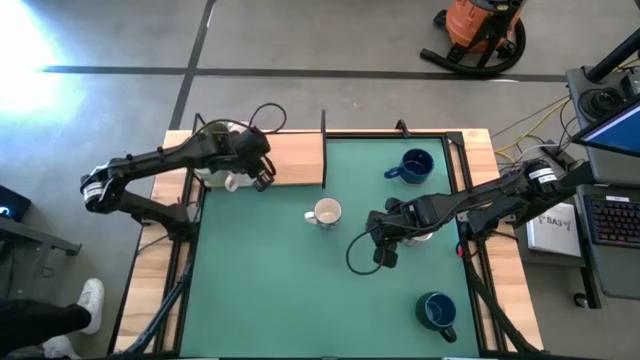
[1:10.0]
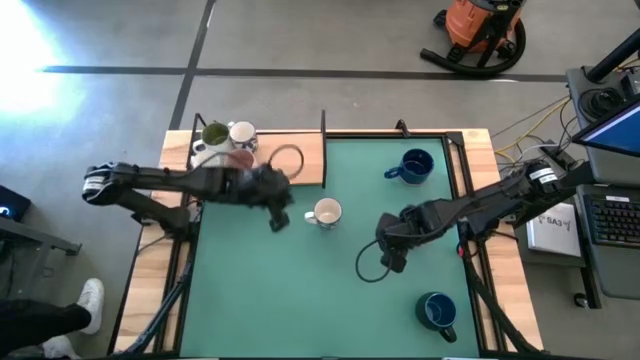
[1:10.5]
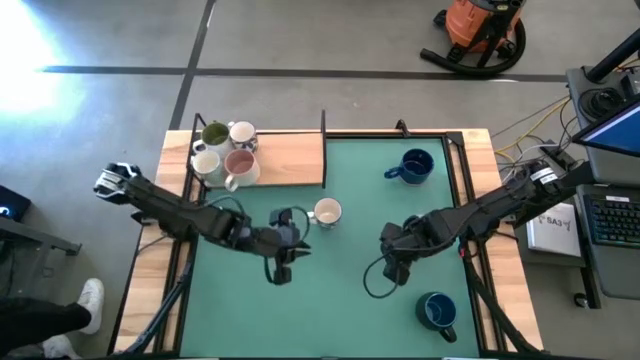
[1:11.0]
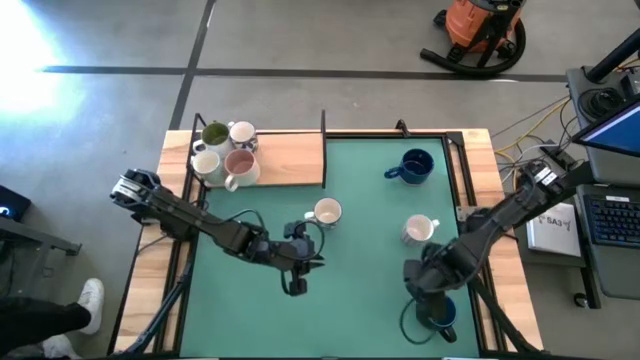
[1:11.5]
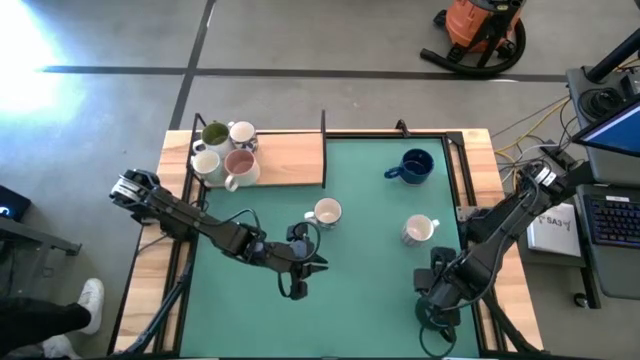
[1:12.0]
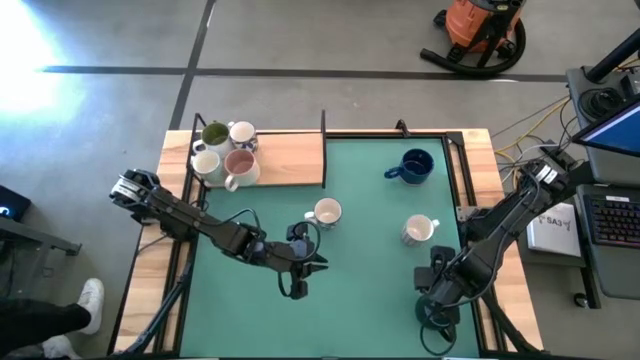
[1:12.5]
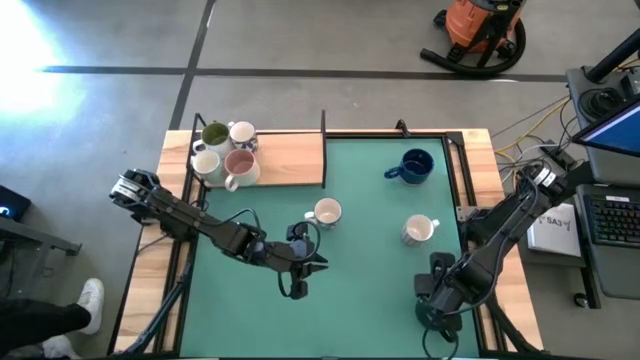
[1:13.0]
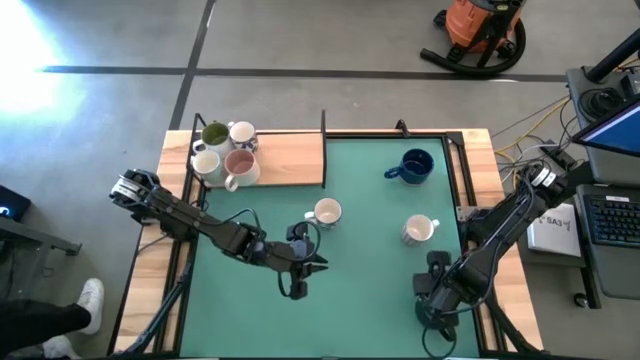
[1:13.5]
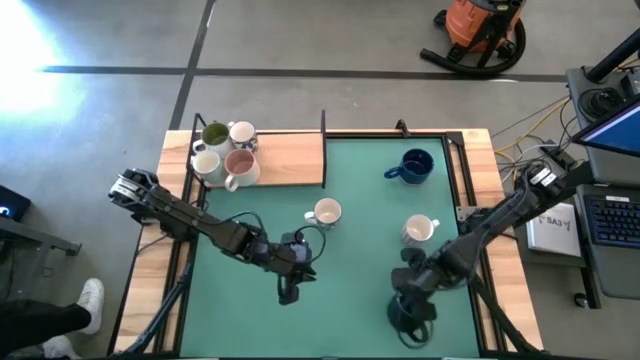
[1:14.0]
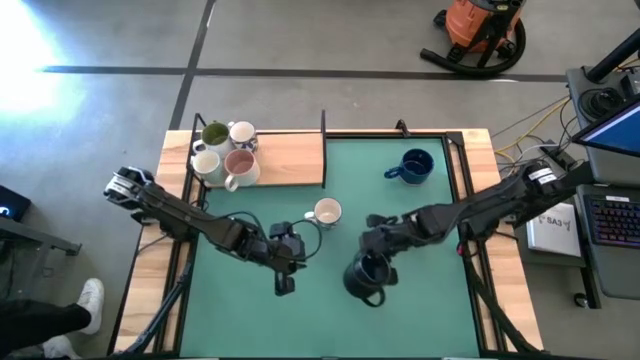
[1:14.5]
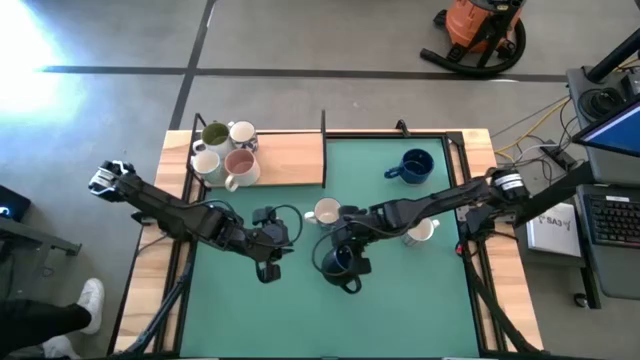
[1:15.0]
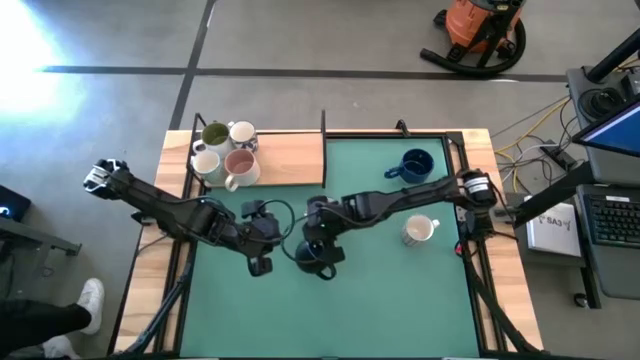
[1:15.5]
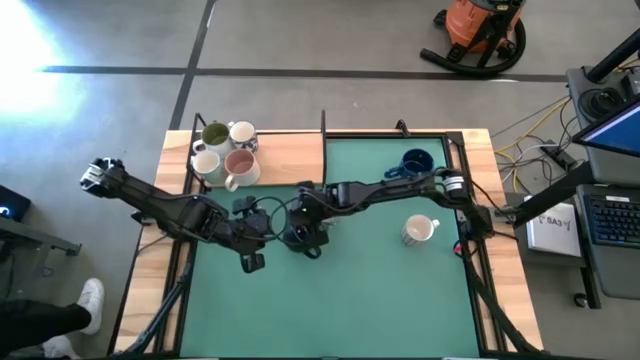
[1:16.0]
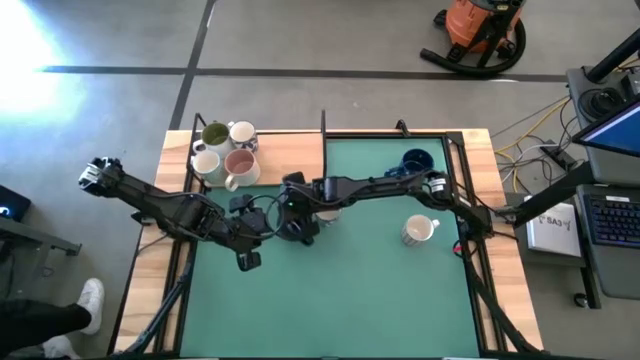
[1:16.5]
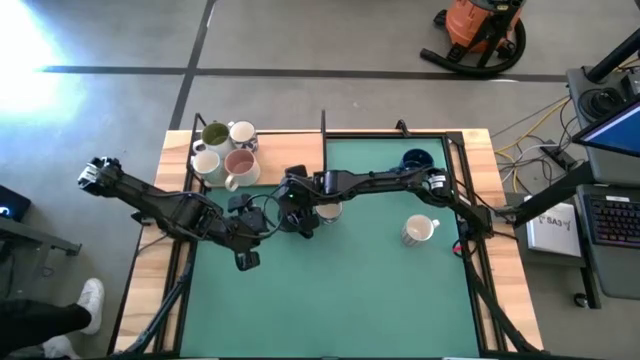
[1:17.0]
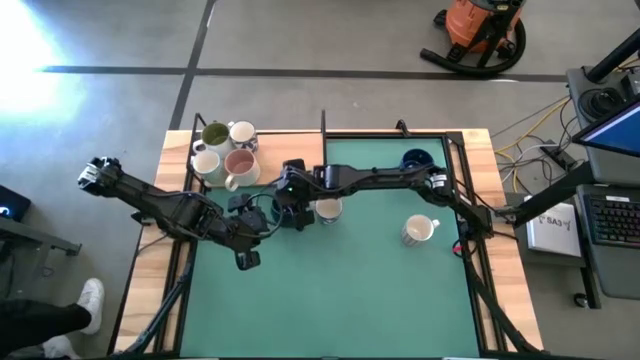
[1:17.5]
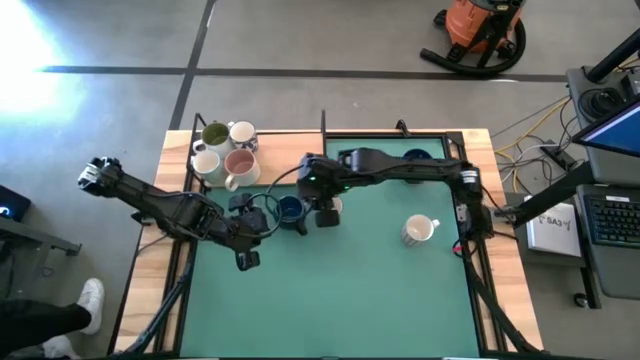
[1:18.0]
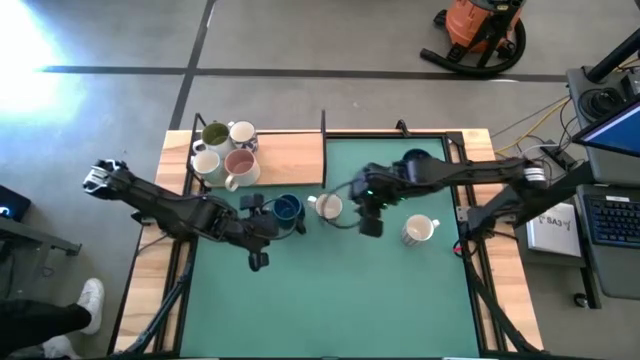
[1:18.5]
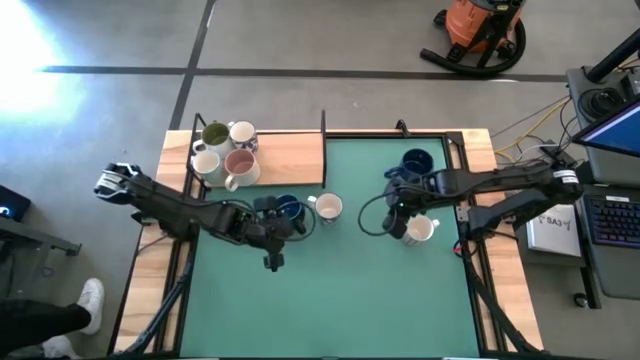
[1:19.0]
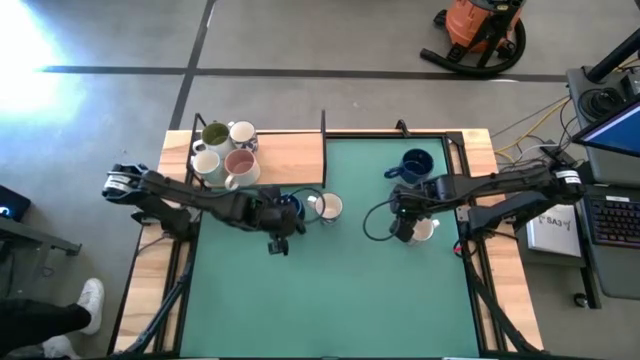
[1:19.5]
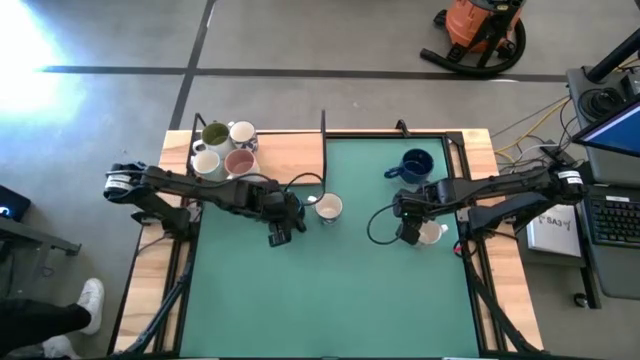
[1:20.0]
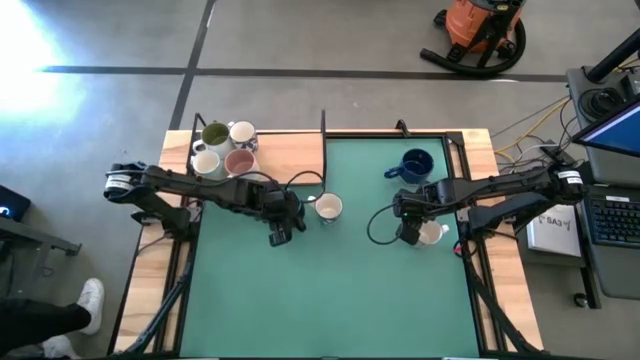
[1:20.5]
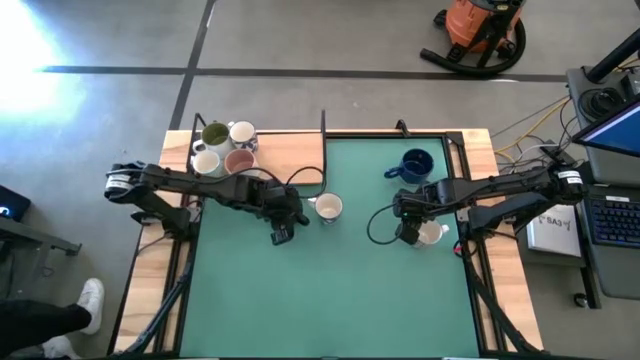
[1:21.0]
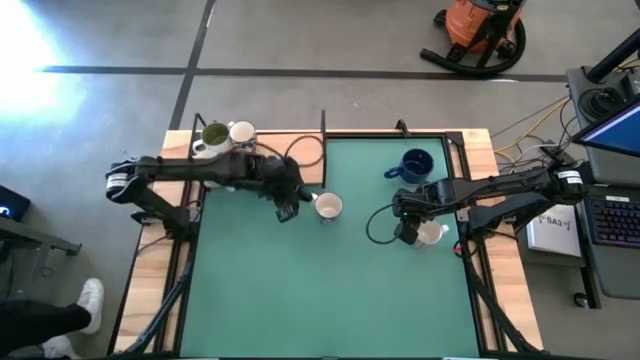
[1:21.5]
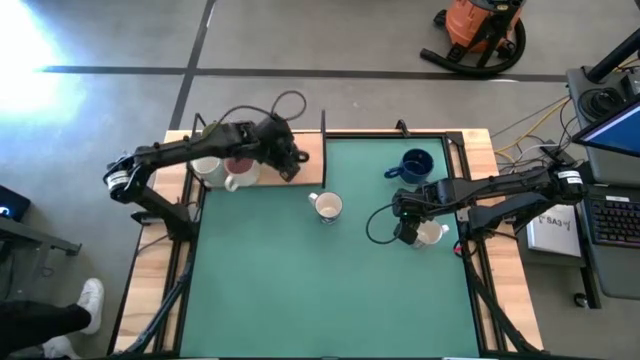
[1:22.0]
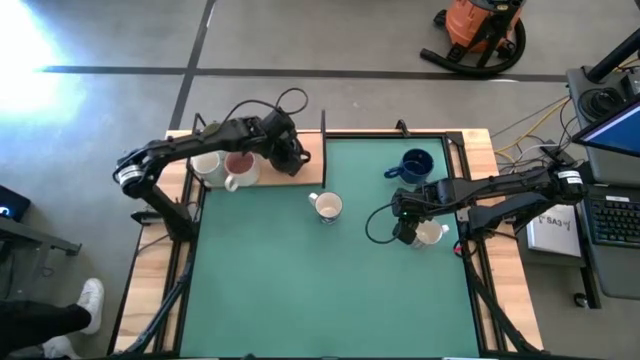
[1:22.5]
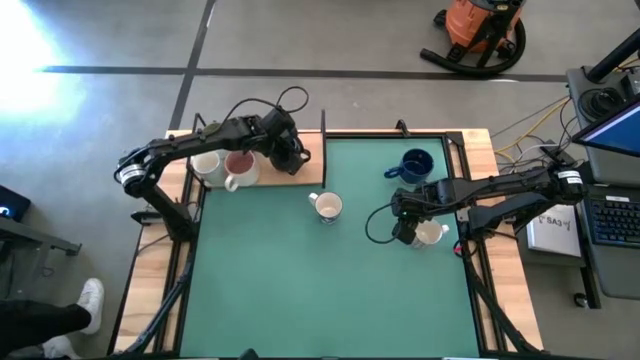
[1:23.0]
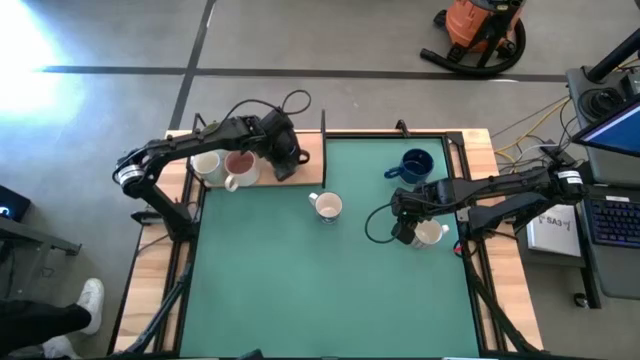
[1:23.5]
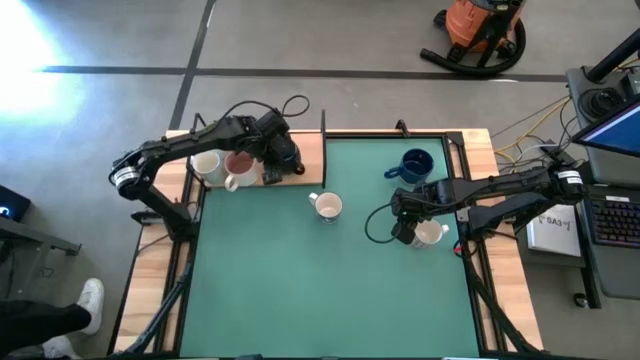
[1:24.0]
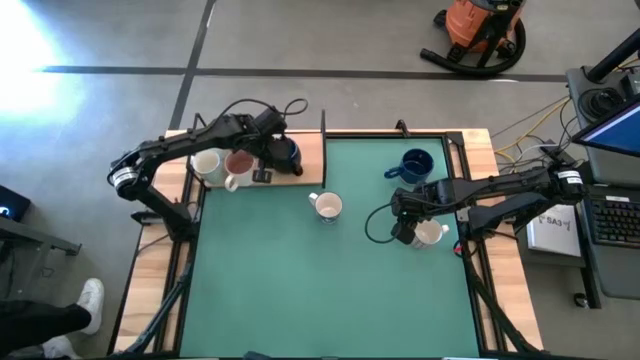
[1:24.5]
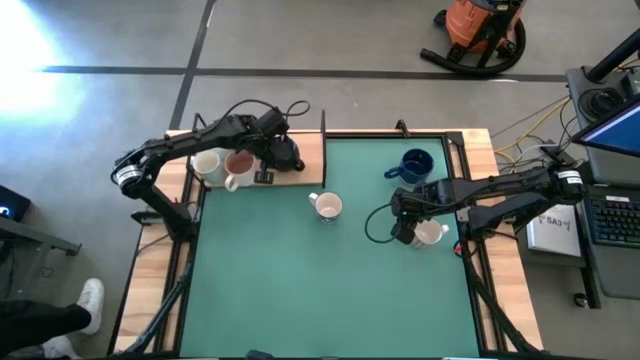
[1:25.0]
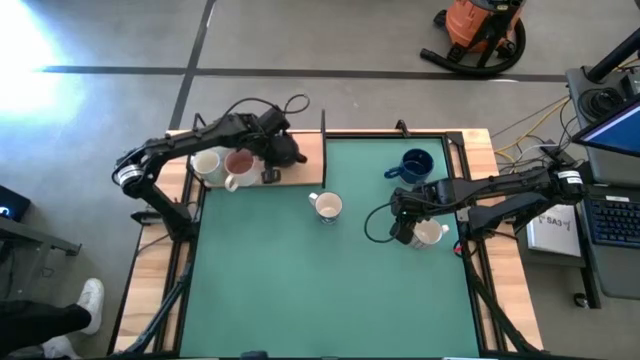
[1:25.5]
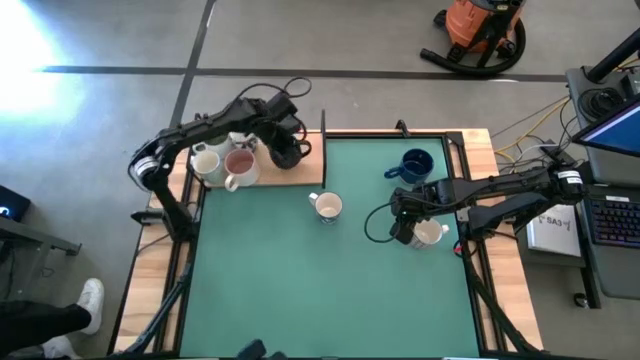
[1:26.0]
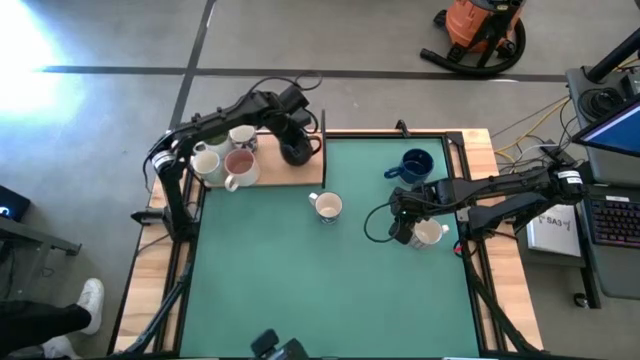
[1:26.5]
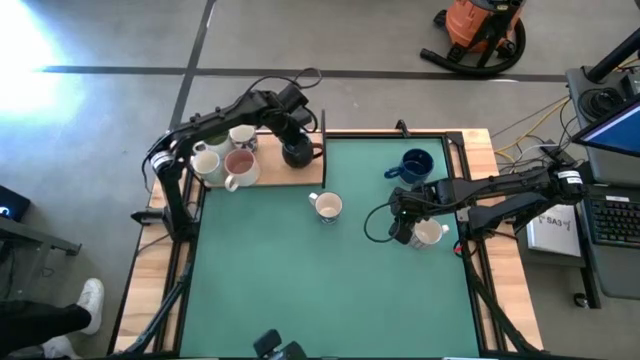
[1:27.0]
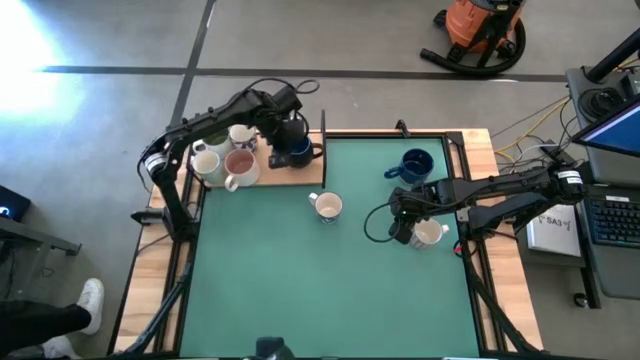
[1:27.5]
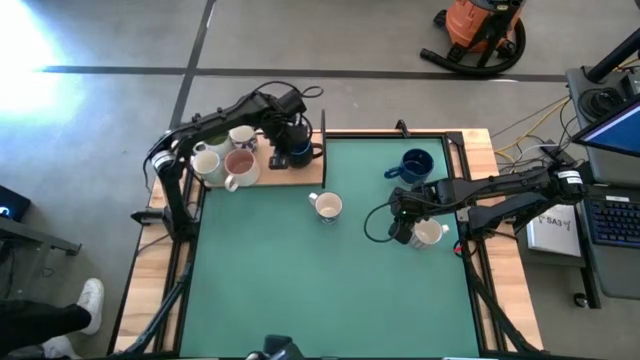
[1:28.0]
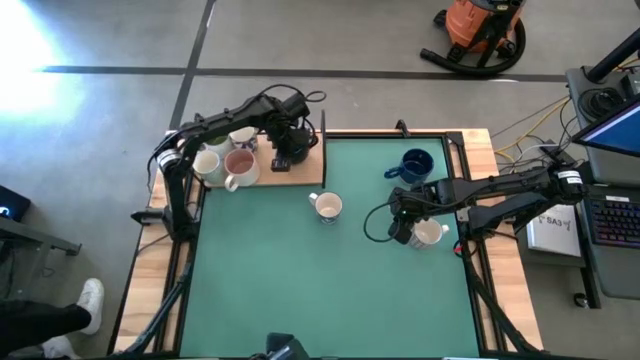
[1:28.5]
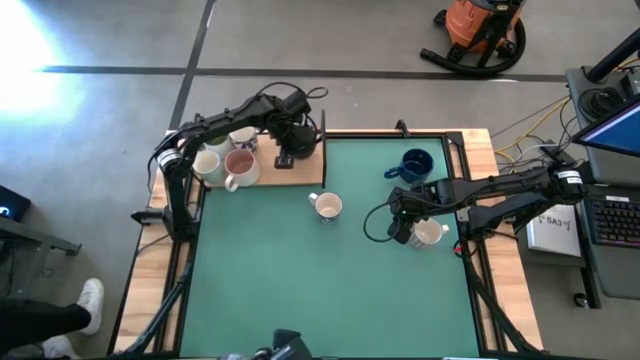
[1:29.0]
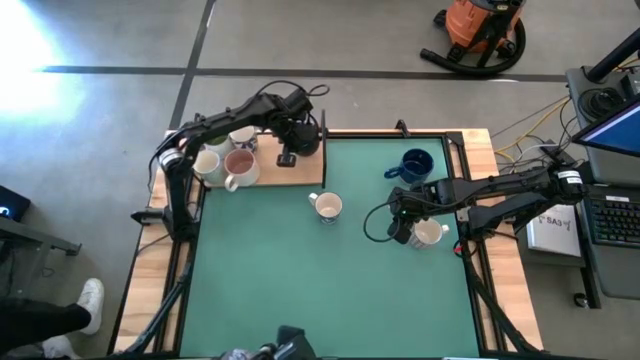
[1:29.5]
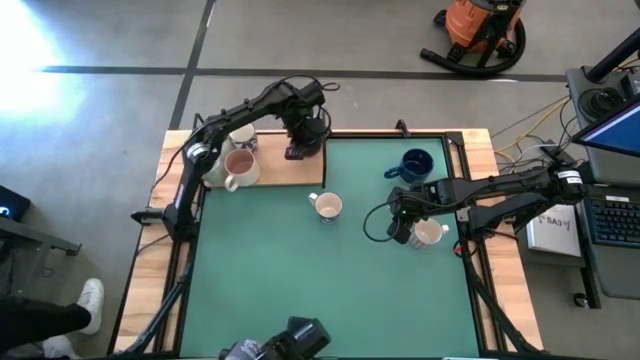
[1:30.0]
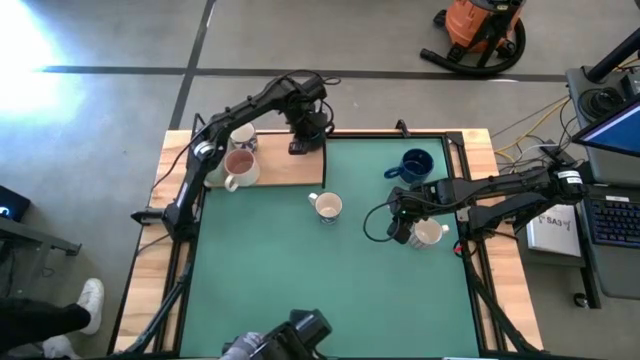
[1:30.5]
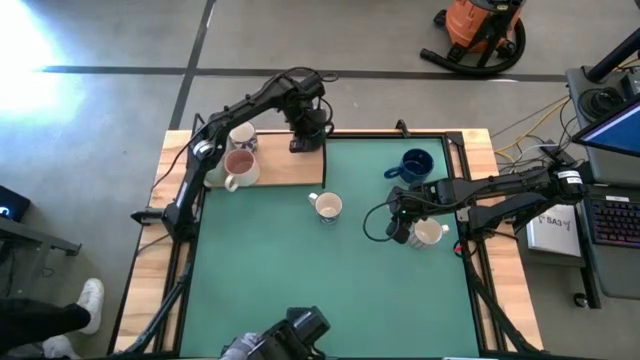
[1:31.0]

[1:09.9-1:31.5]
Task: Place coffee mugs
Put the black-blue mug on the shelf

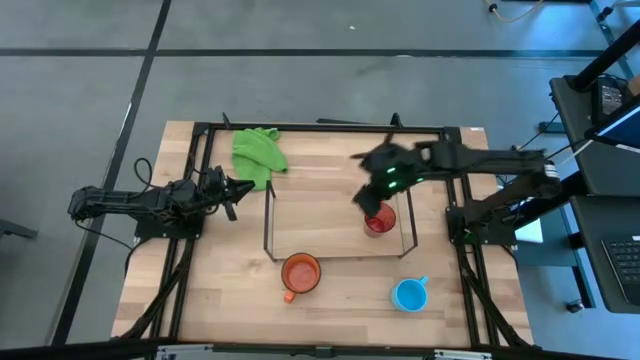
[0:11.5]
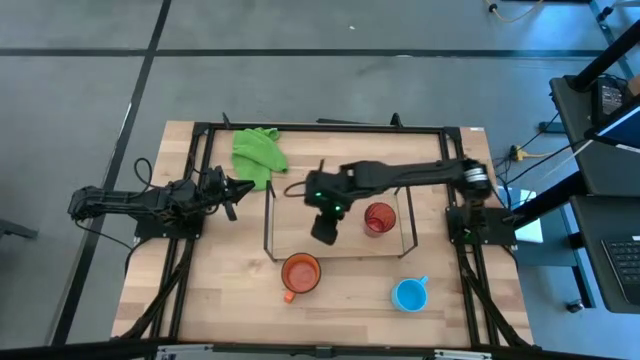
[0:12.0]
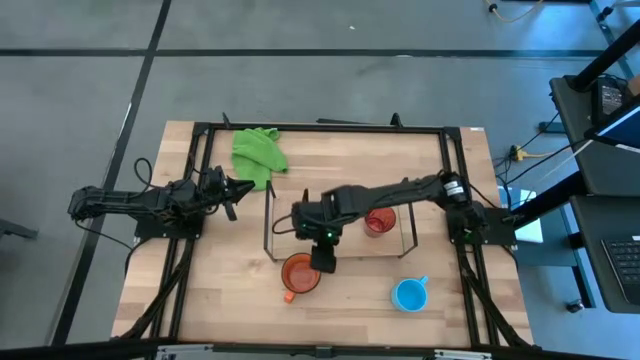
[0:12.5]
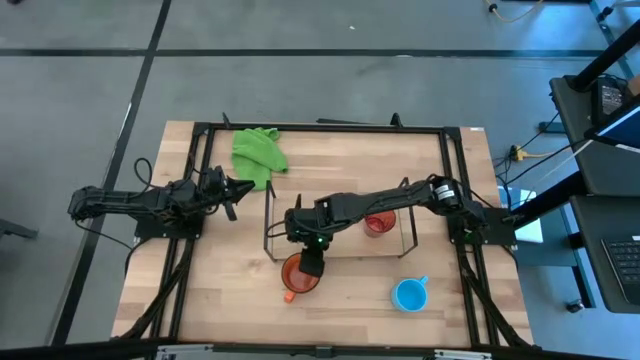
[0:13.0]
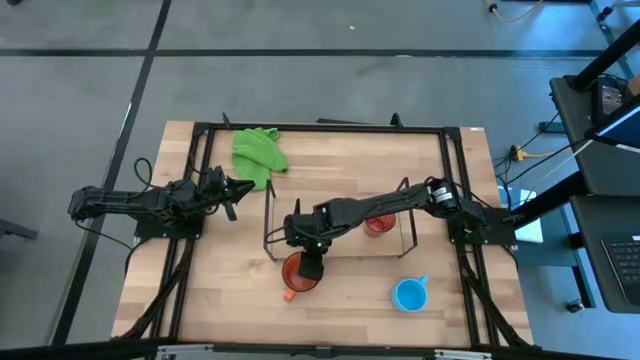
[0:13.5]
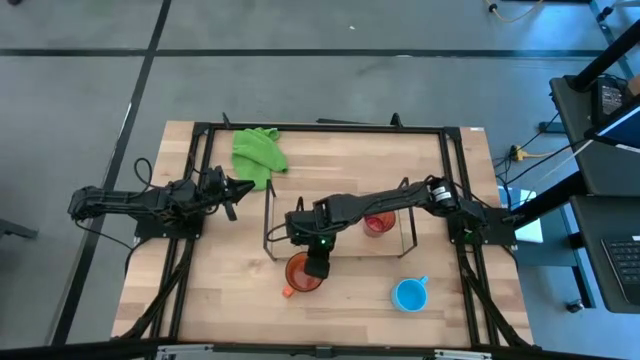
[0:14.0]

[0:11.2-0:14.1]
Task: Stack small to large cups/mugs on shelf
Put the orange mug on the shelf
